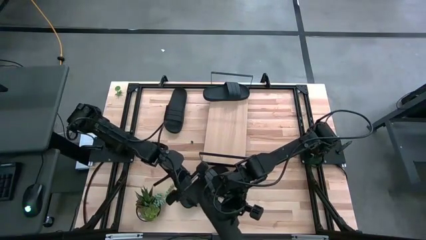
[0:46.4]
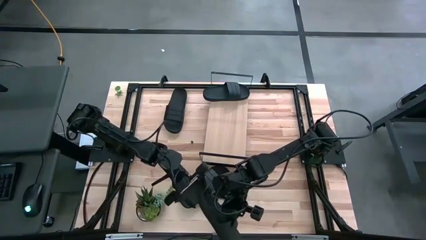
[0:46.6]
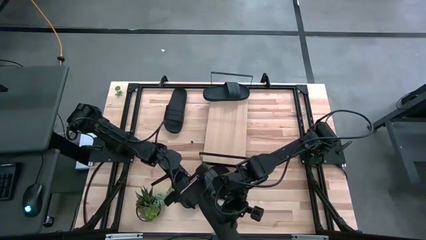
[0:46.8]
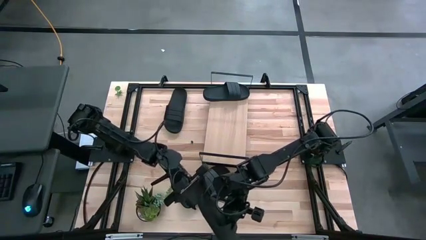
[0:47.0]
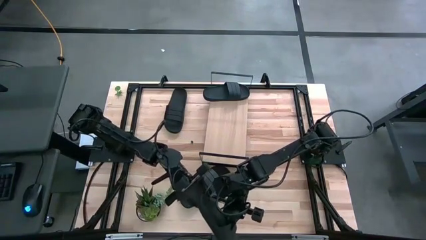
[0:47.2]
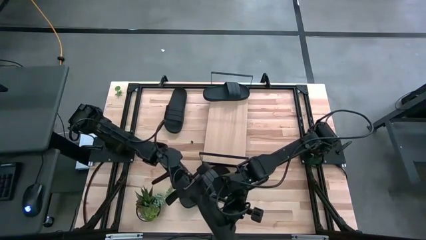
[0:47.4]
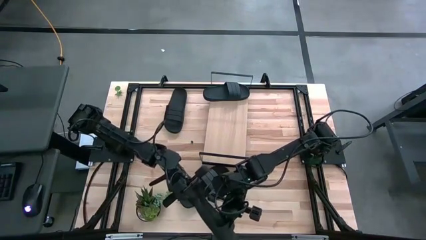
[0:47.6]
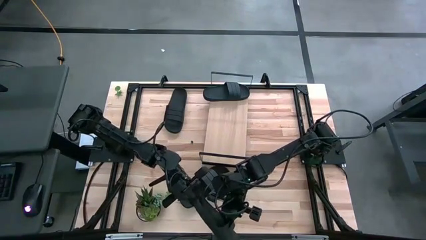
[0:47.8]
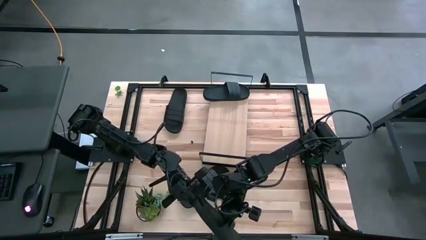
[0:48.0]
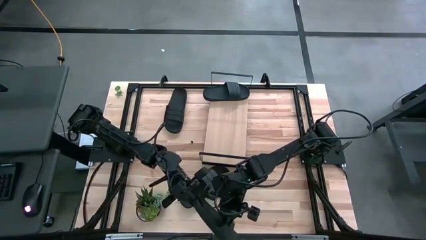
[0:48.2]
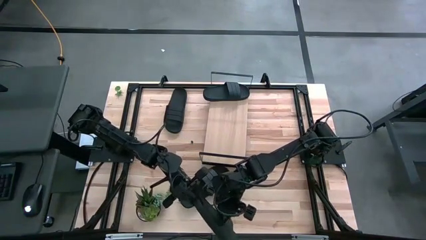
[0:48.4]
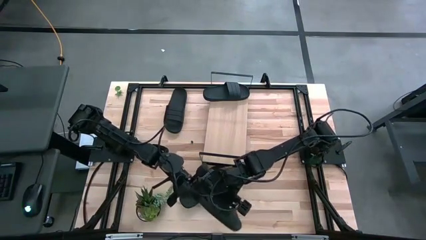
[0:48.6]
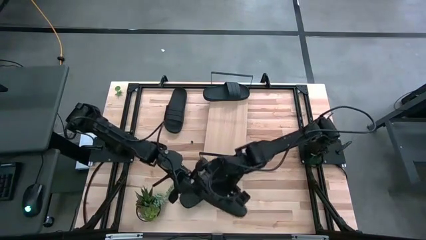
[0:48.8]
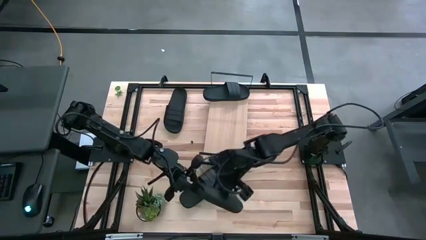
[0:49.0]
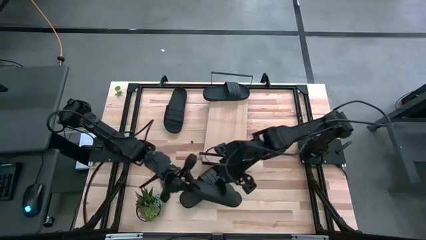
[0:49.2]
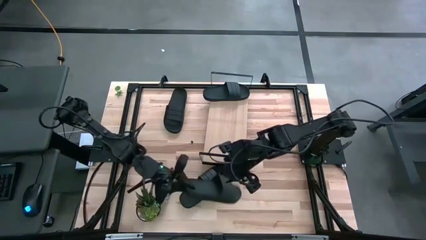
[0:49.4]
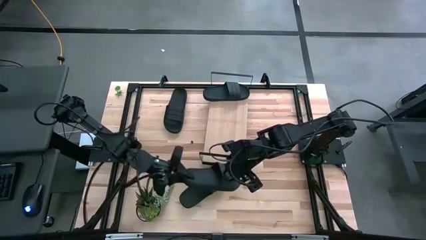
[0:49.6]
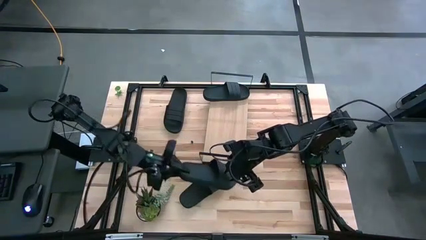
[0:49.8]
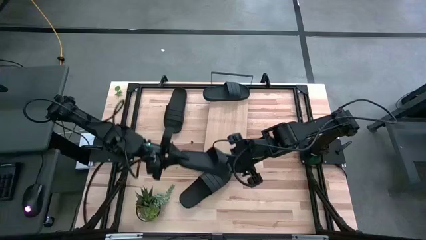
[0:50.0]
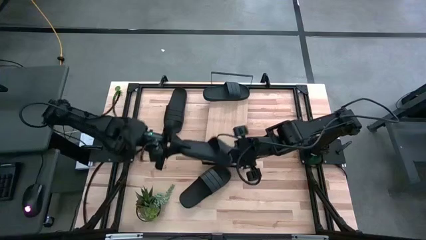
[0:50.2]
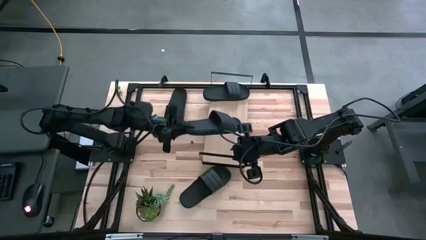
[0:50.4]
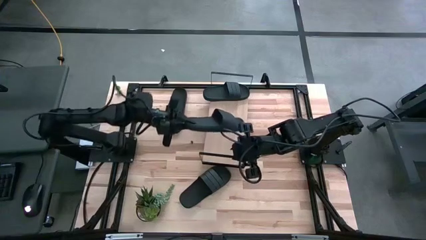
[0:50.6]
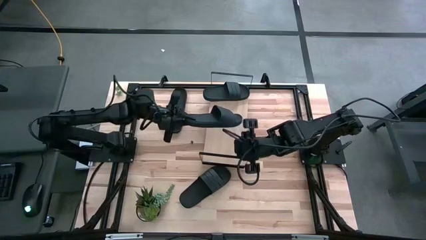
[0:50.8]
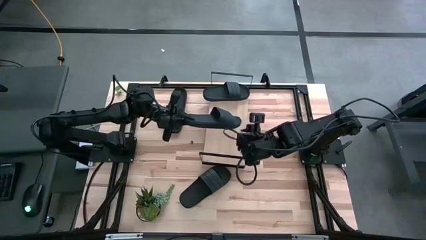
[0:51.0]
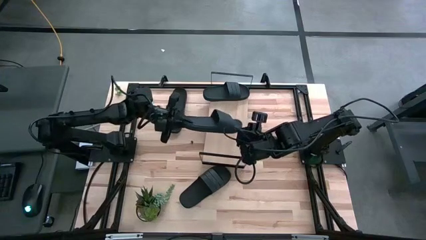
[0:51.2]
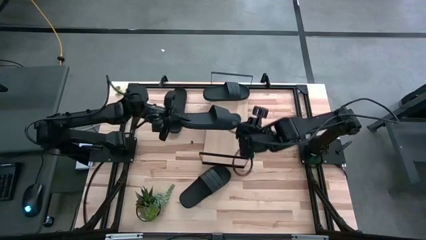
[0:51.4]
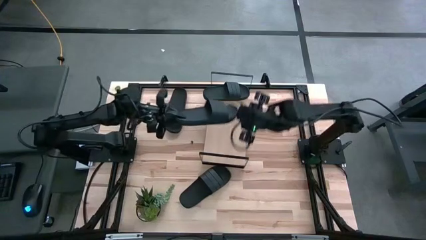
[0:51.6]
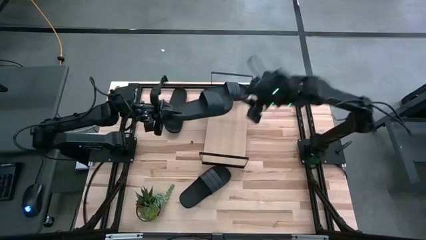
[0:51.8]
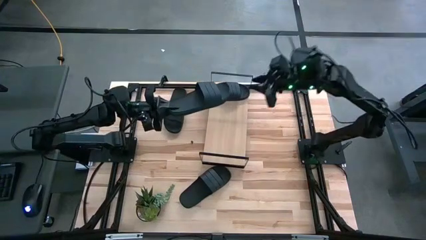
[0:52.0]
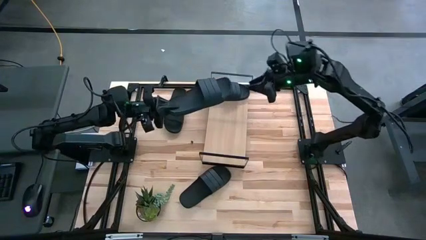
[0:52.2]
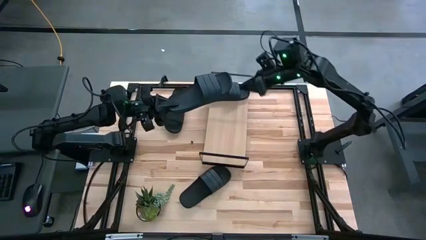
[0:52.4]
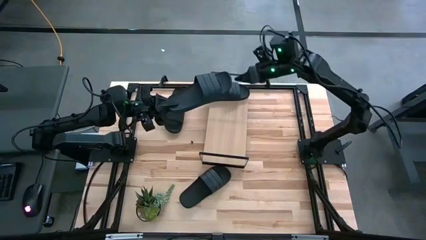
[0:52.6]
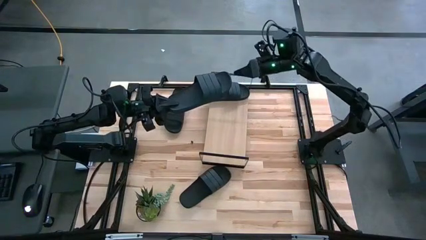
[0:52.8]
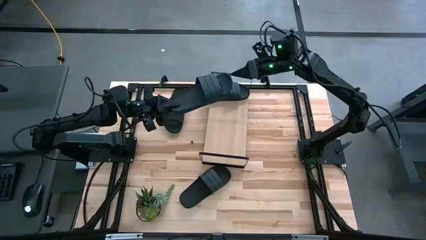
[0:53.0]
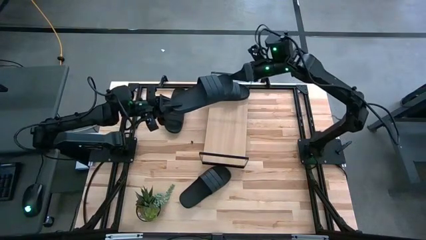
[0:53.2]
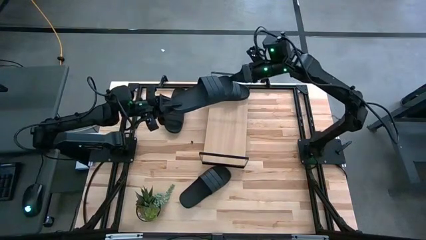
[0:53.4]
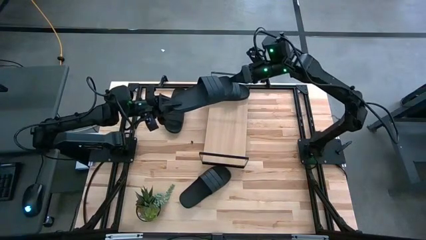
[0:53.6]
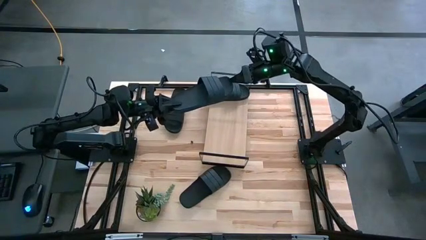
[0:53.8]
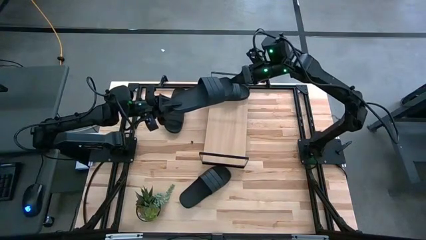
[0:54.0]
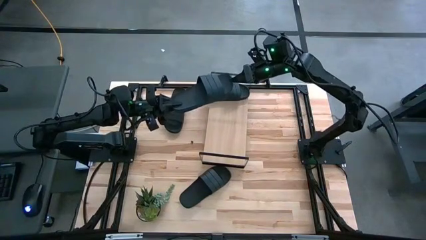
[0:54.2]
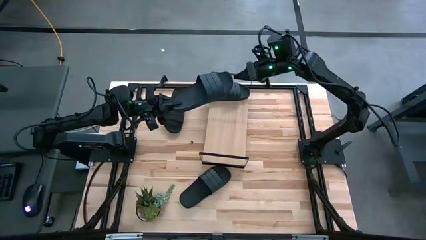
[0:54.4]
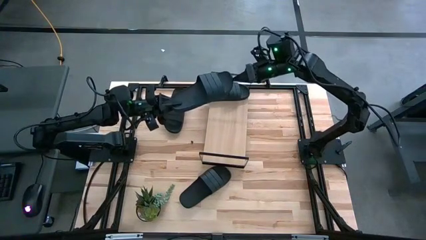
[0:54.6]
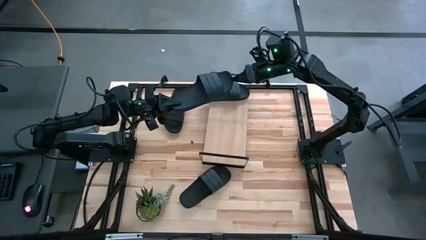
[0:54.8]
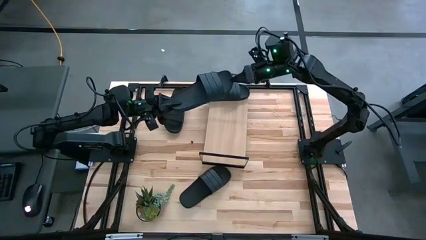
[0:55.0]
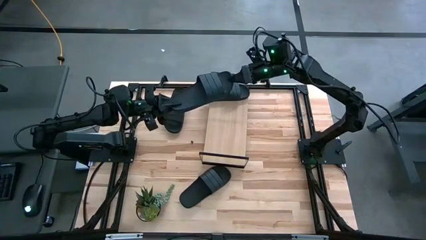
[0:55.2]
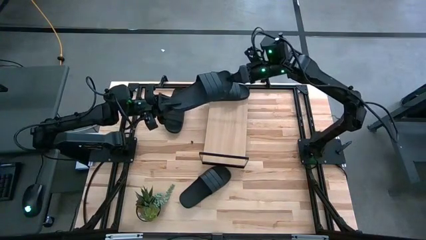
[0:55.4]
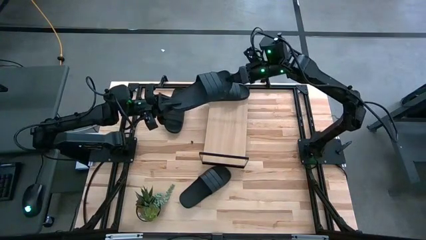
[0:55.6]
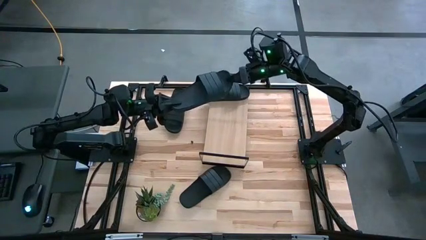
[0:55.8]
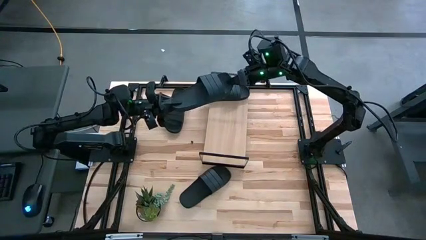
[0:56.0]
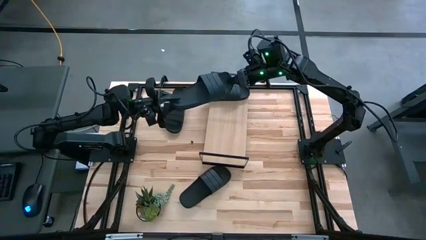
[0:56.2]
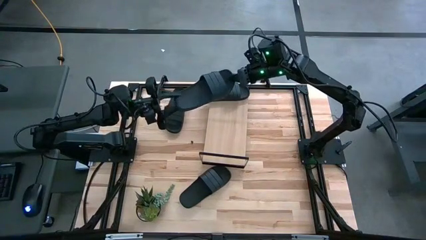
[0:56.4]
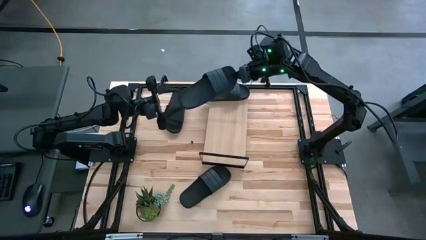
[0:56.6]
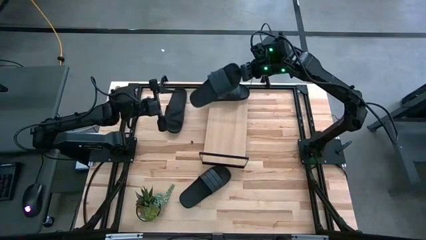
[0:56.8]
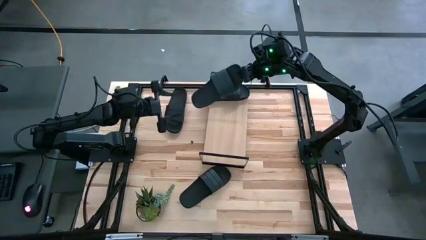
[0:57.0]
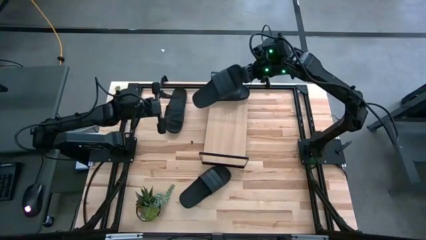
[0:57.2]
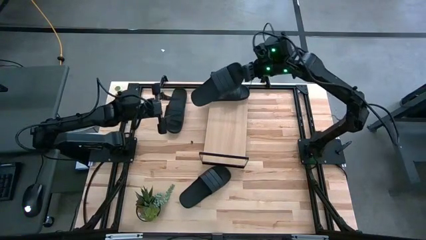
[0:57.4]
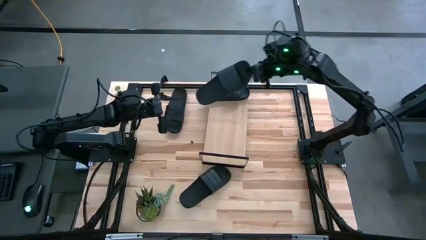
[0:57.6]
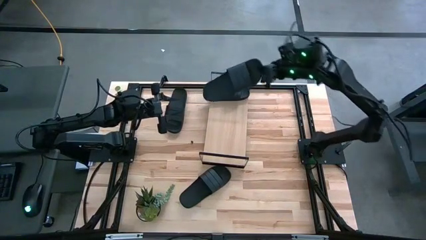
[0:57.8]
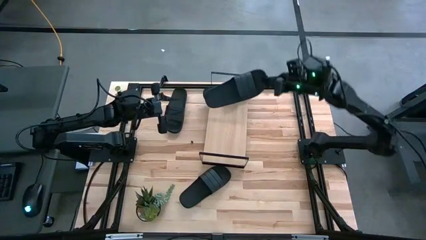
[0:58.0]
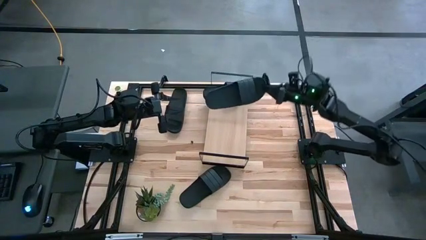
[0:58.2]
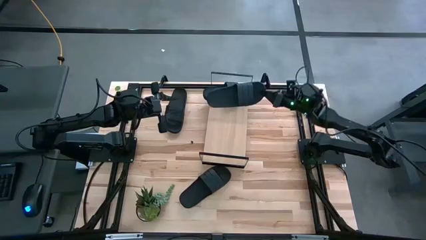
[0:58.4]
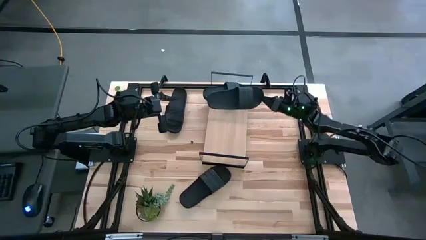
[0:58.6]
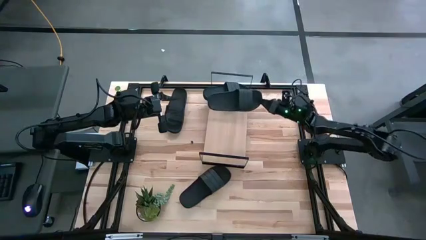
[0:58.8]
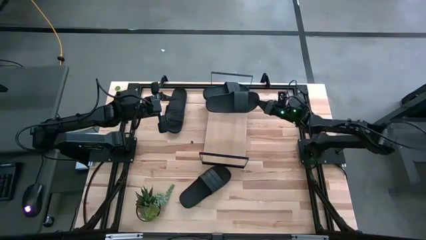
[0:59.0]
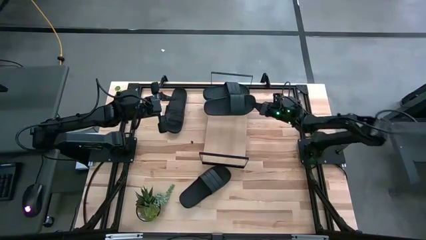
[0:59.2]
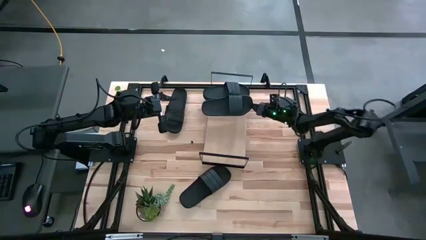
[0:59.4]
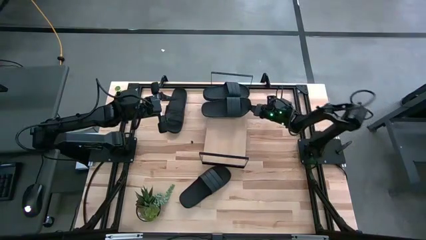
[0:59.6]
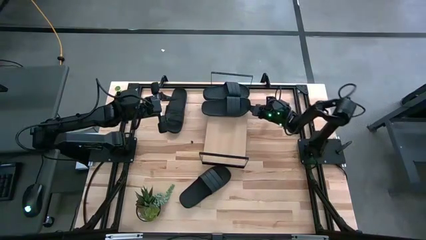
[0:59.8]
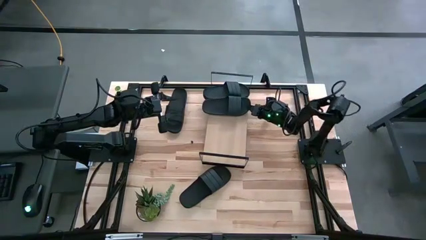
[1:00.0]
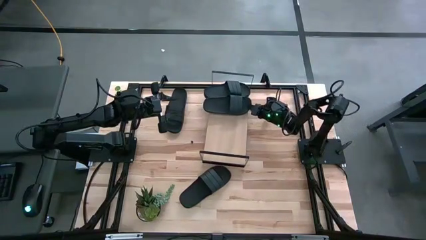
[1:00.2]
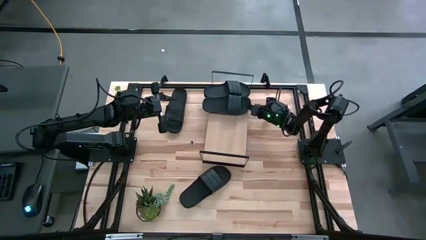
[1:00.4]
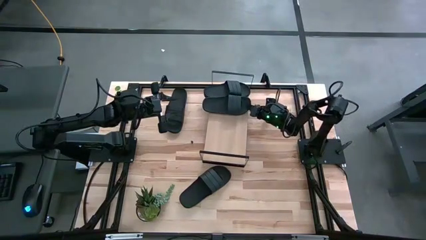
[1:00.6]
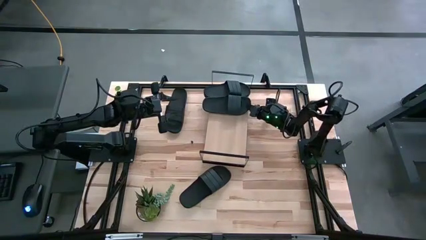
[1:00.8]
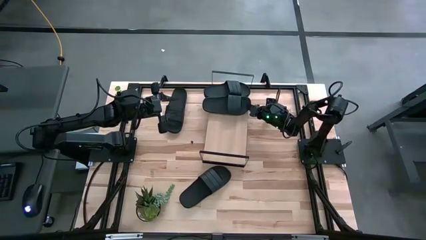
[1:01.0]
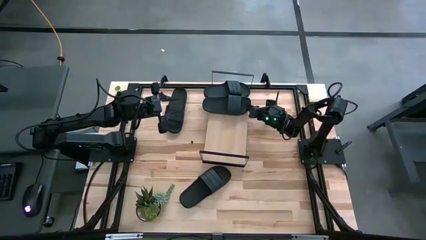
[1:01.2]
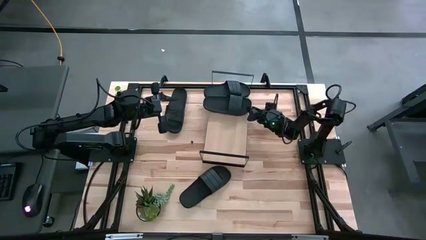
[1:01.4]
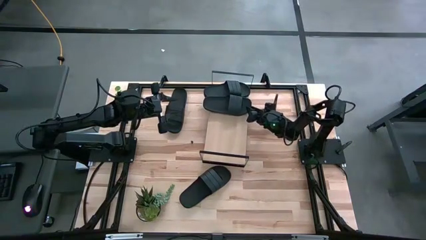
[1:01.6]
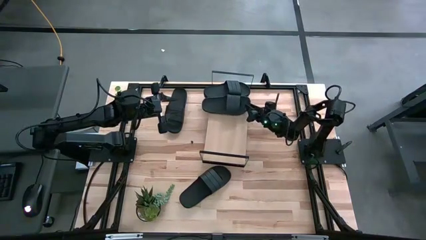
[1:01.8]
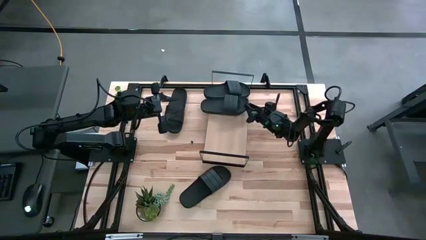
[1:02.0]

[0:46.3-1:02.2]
Task: Pick and place slides into the shelf
Put the bottom right black slide on the shelf

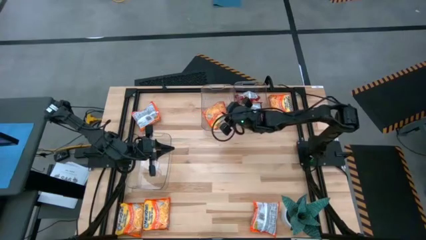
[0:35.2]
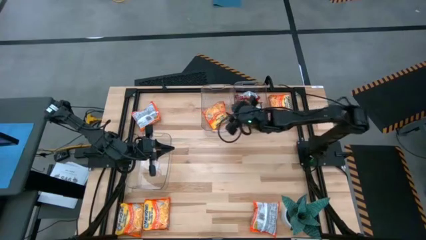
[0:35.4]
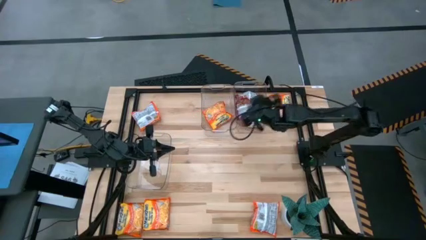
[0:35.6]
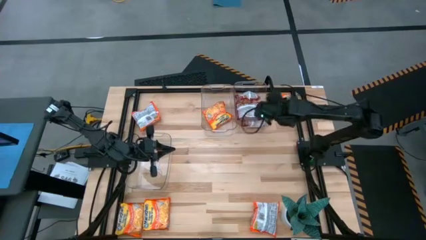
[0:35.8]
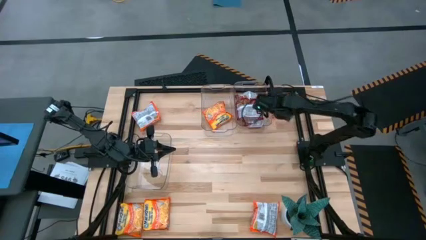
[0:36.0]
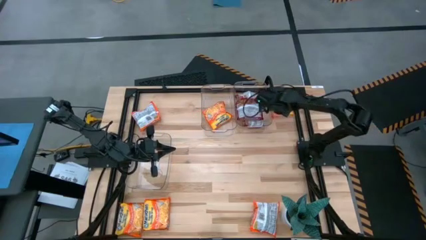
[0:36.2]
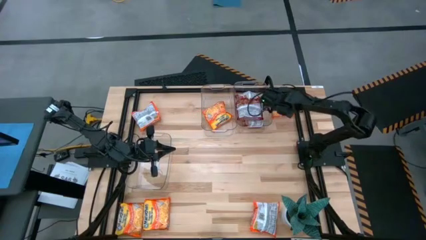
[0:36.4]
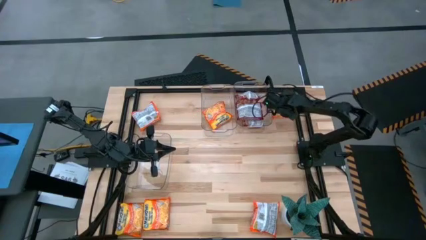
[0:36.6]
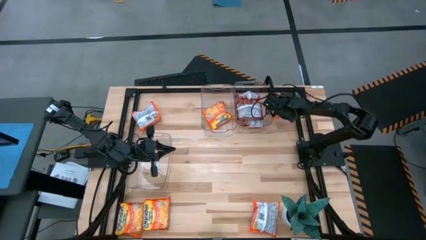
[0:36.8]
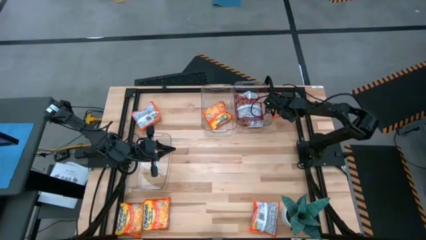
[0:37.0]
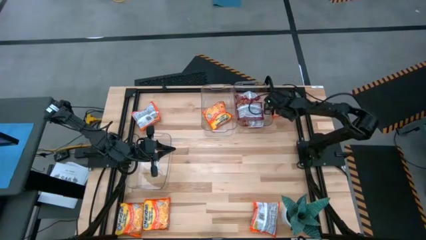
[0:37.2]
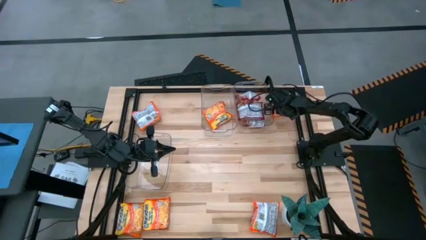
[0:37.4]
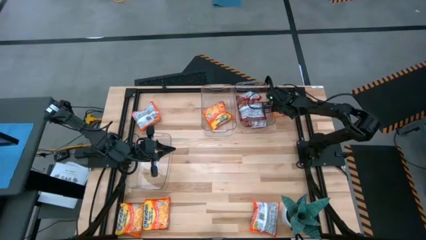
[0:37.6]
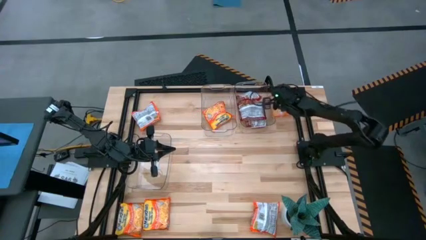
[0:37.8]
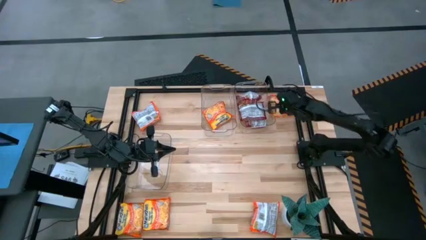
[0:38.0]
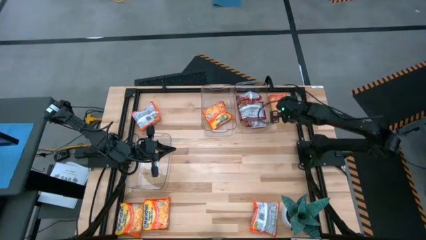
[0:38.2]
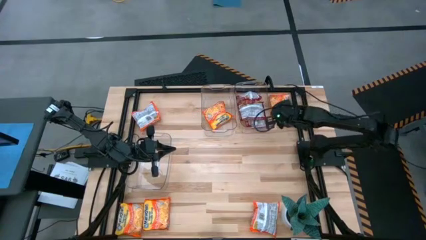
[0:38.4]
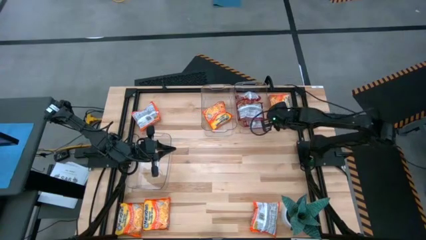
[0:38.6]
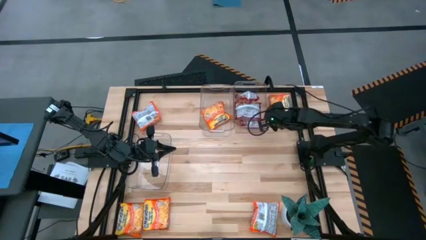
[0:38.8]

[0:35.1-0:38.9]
Task: Sort Maruchan noodles
Adjust the top right transparent bin on the table
